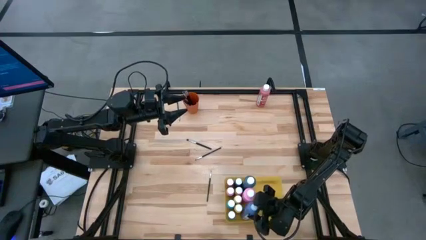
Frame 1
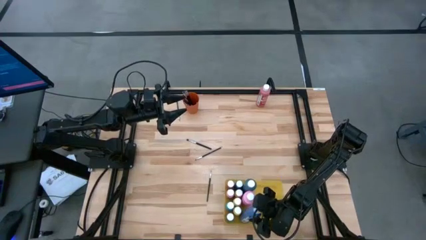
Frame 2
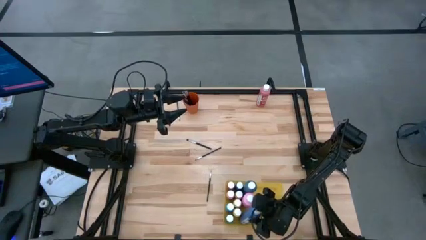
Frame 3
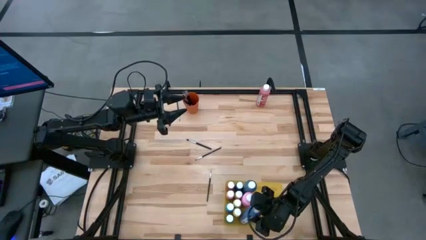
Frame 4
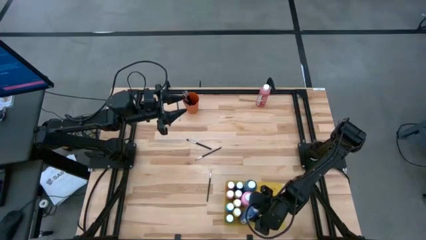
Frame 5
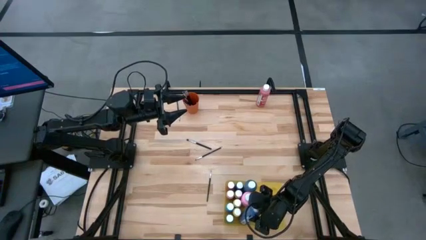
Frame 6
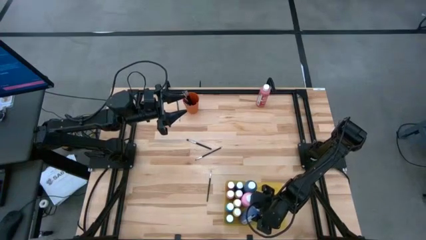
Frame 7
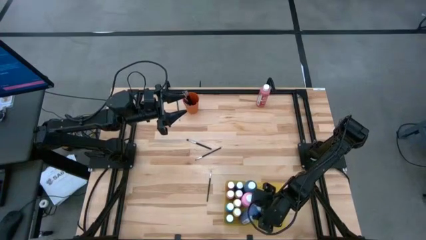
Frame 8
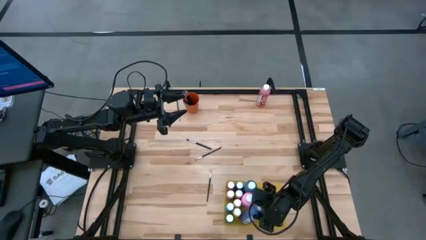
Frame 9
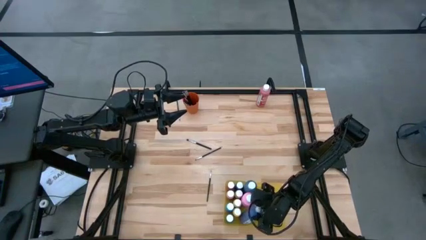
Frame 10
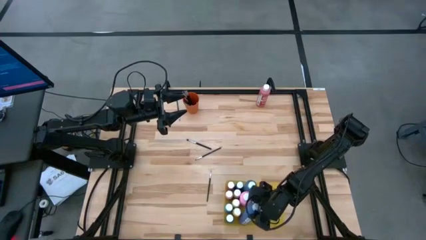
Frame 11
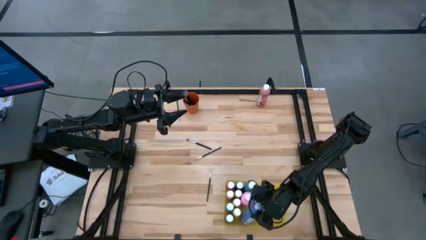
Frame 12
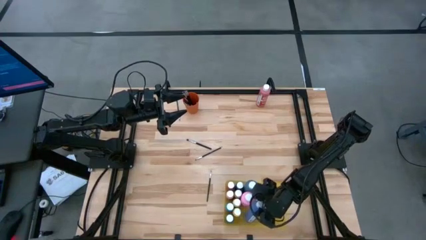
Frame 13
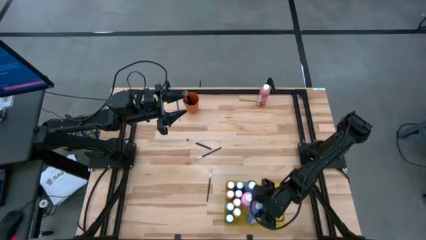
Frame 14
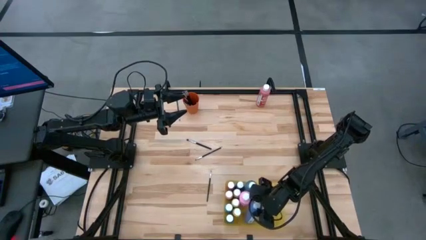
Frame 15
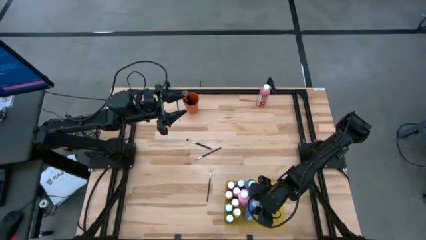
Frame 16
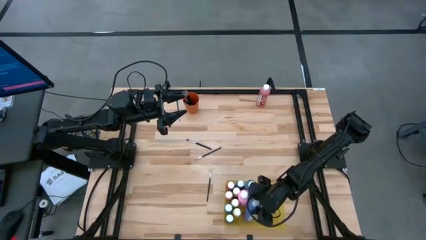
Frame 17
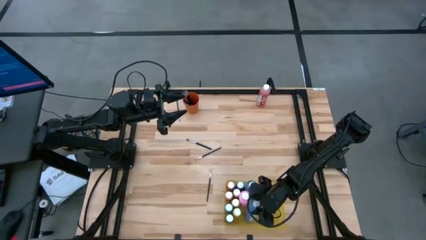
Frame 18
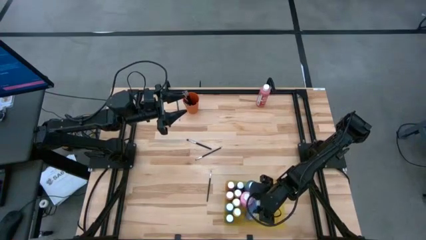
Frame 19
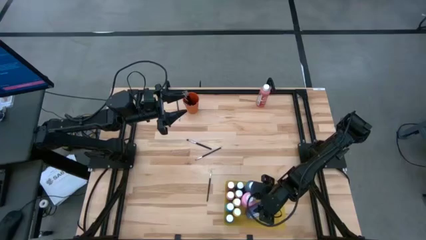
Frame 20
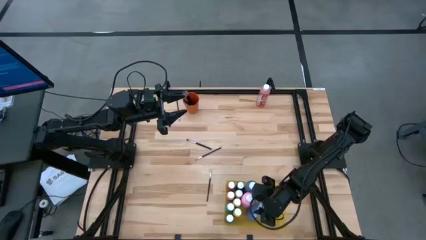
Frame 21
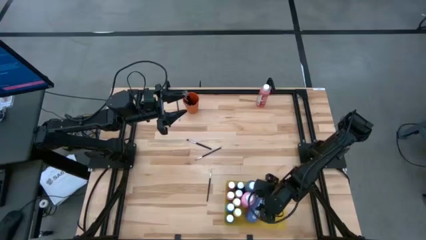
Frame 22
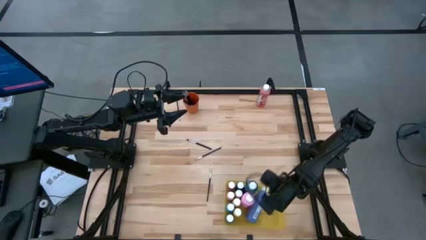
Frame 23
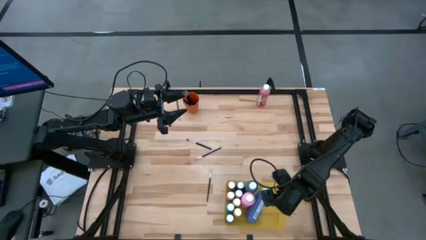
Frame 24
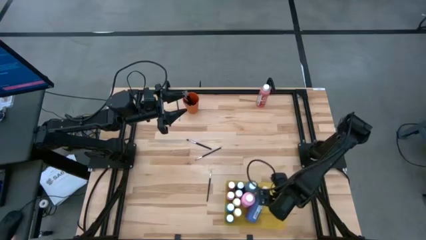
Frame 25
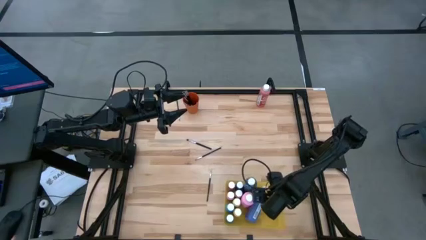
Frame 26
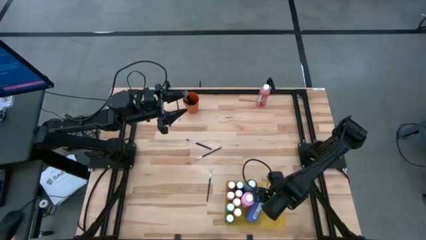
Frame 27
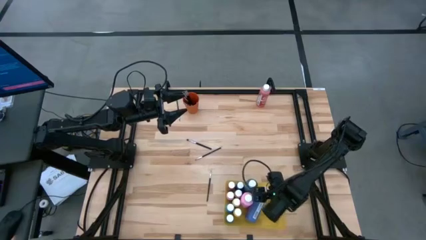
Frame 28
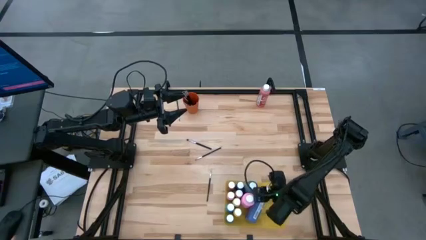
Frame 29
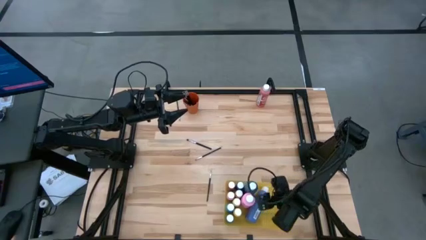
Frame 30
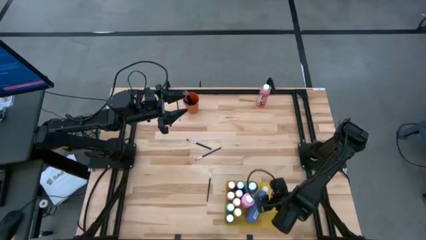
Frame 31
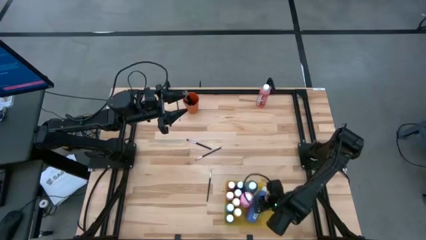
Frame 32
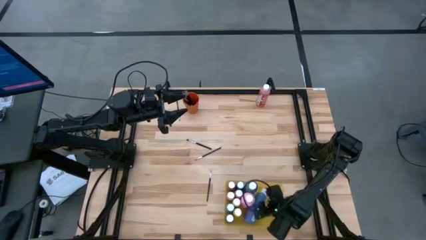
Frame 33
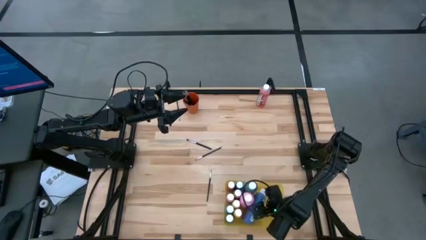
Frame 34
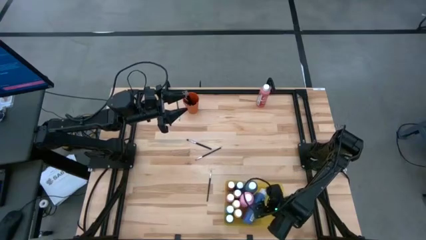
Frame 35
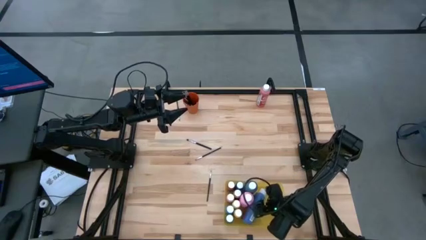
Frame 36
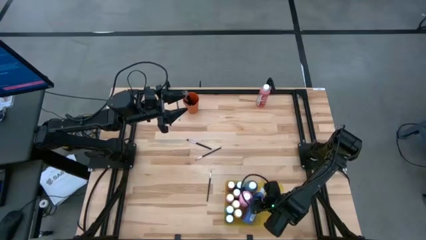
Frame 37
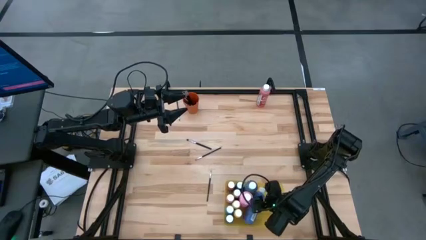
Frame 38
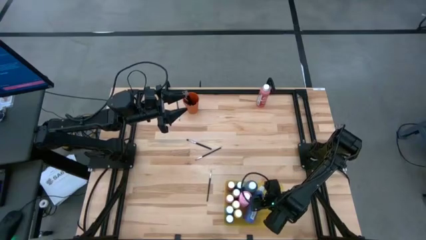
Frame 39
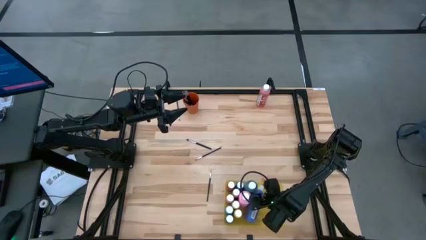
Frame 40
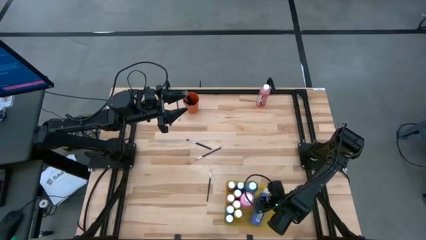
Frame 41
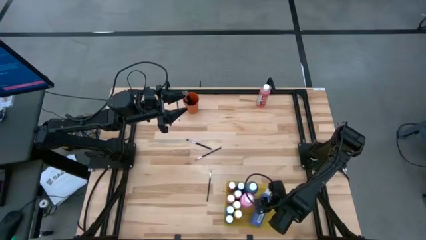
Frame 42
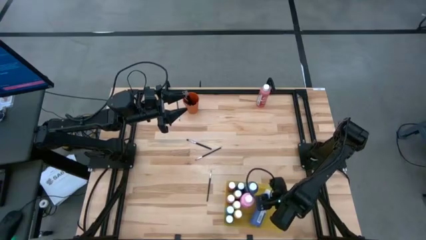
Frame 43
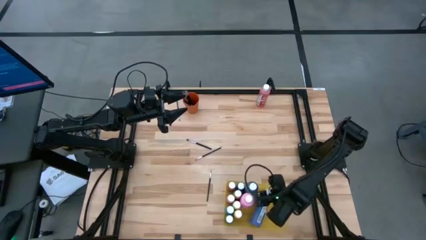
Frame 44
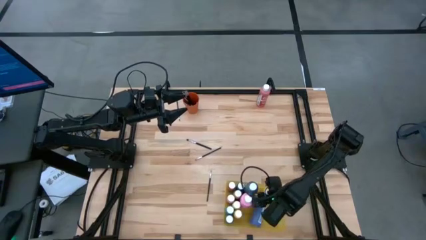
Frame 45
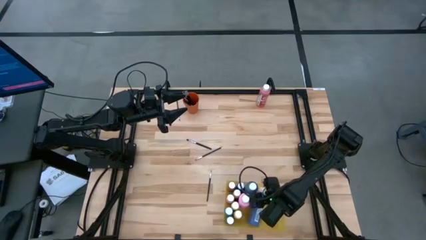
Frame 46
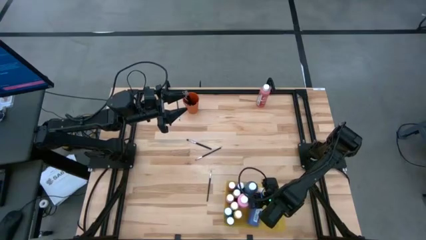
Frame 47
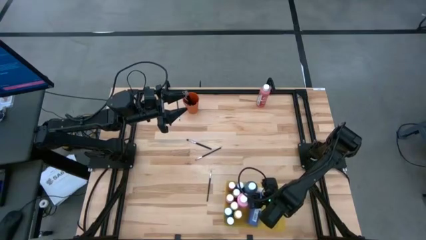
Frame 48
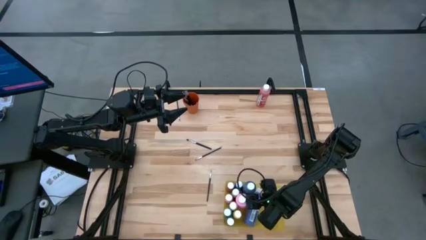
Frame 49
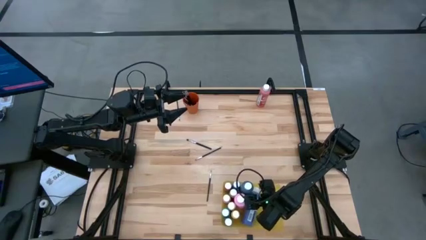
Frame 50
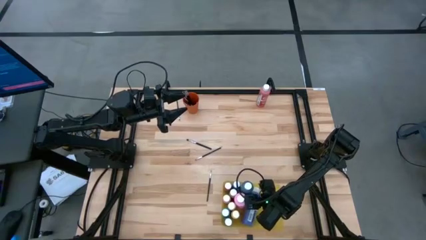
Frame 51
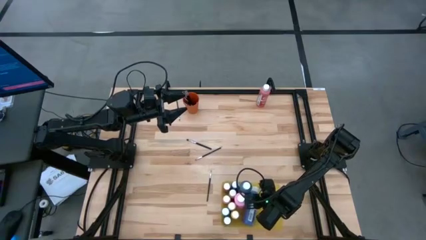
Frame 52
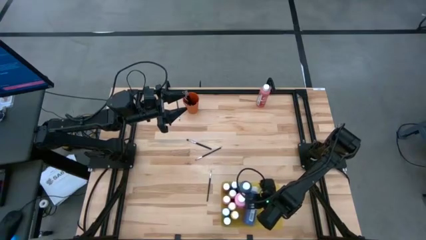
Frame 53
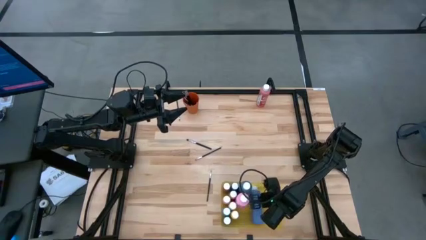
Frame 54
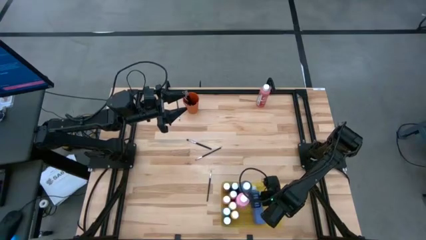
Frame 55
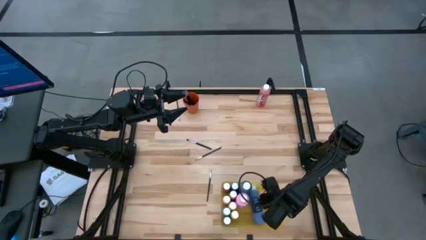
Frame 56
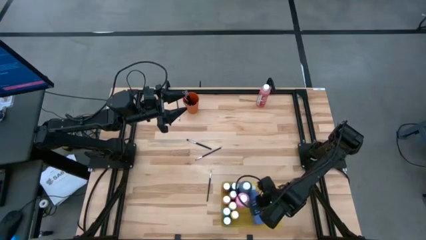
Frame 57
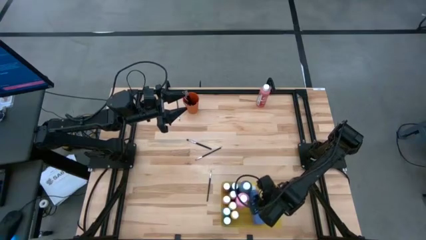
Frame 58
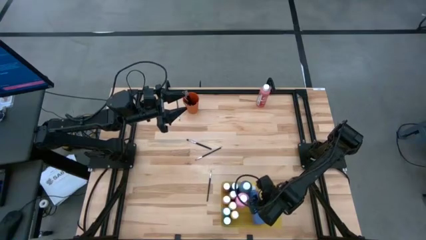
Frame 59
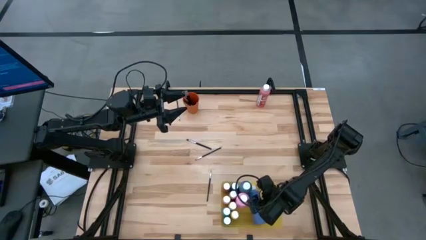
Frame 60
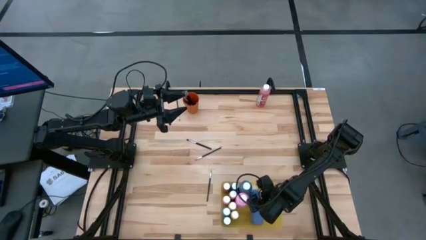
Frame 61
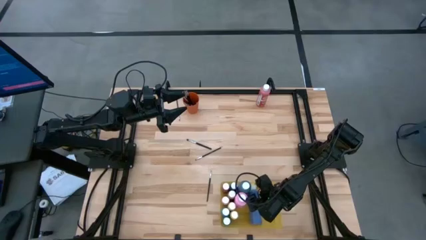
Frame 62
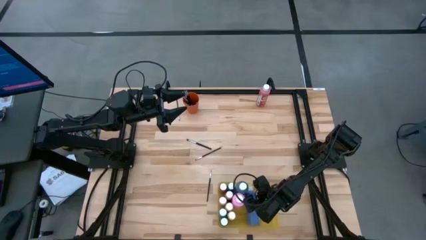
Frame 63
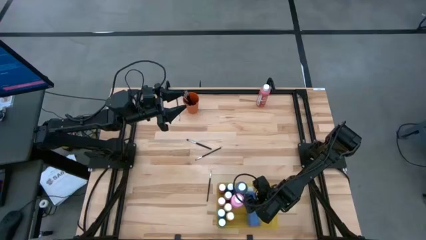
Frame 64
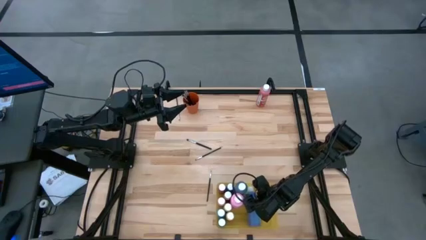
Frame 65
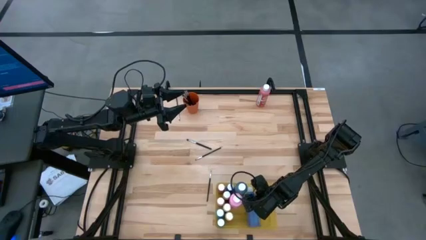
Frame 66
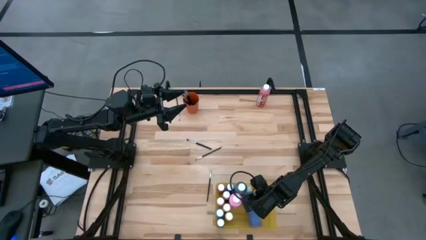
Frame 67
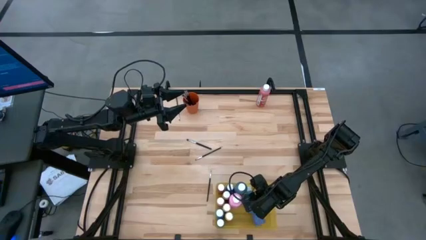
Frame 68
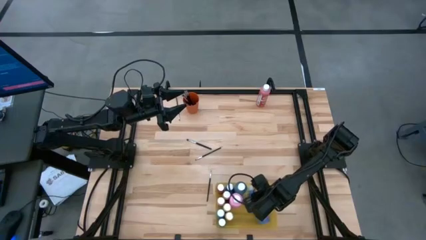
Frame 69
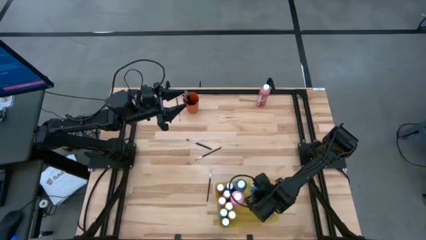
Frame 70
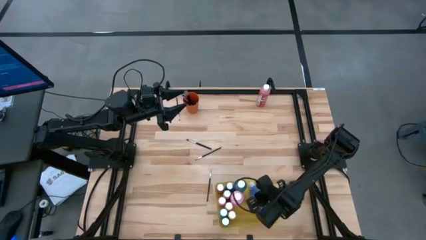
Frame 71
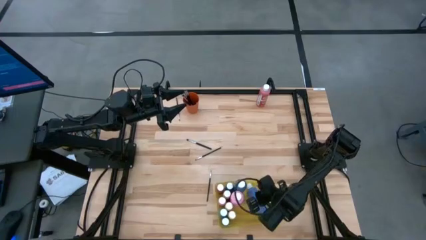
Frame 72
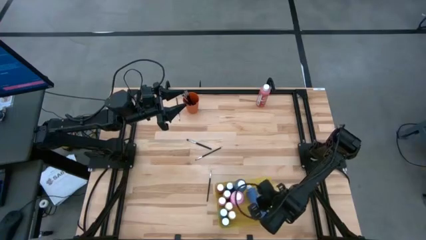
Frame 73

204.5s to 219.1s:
Task: Pick & Place Paint Supplies
Put the purple paint bottle into the yellow bin
